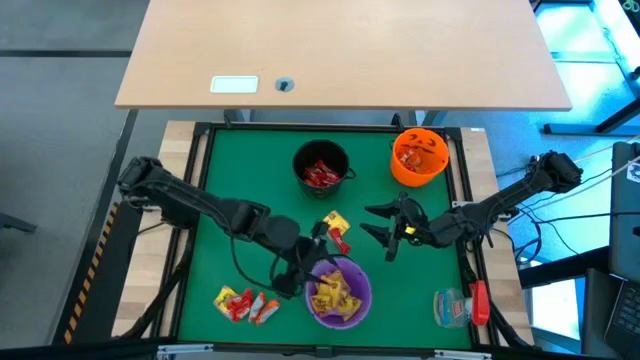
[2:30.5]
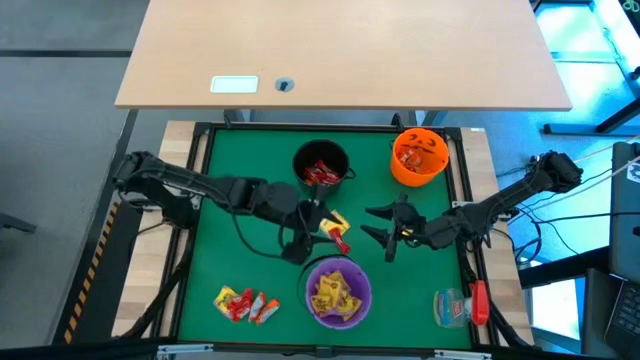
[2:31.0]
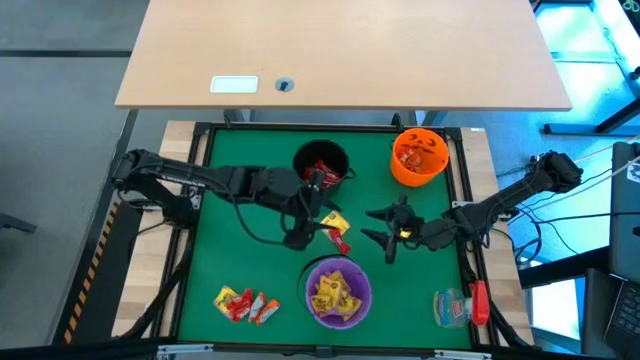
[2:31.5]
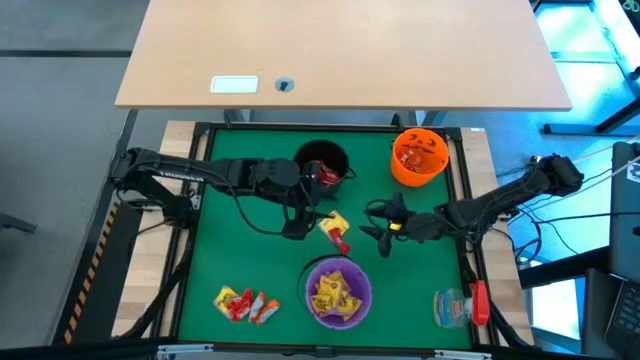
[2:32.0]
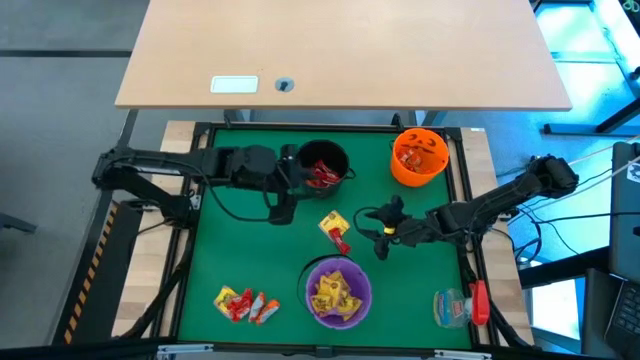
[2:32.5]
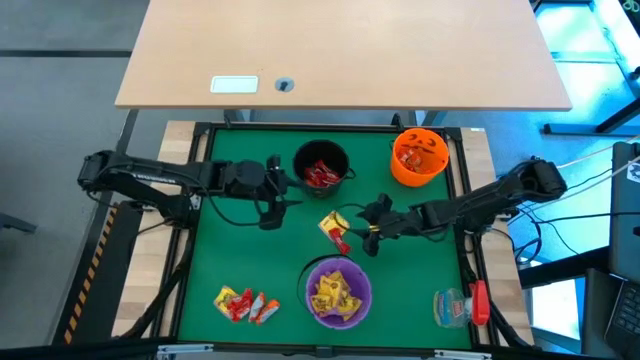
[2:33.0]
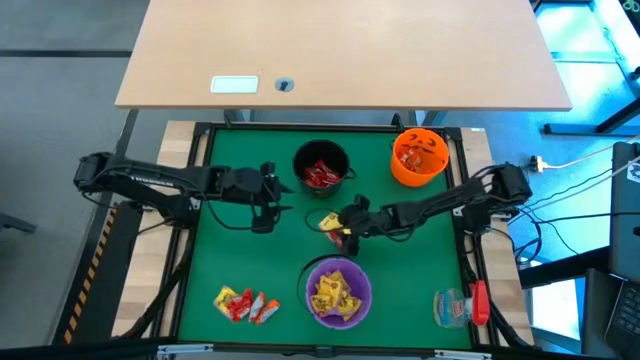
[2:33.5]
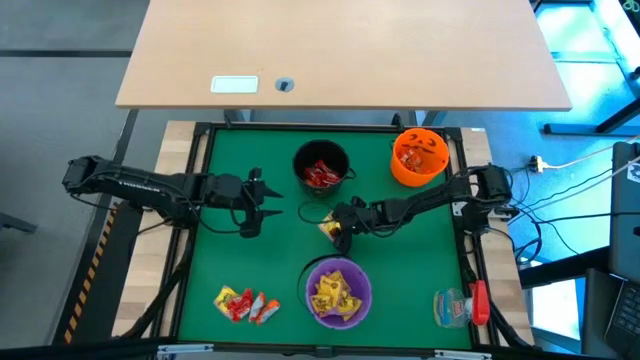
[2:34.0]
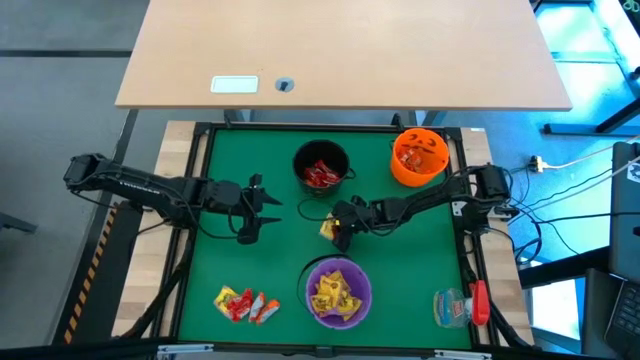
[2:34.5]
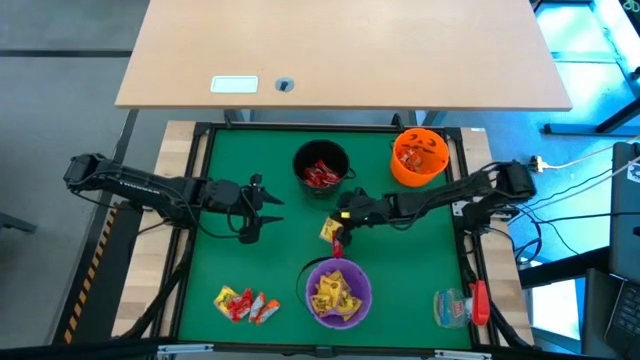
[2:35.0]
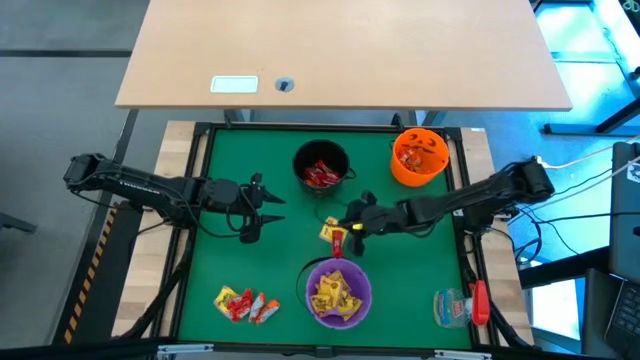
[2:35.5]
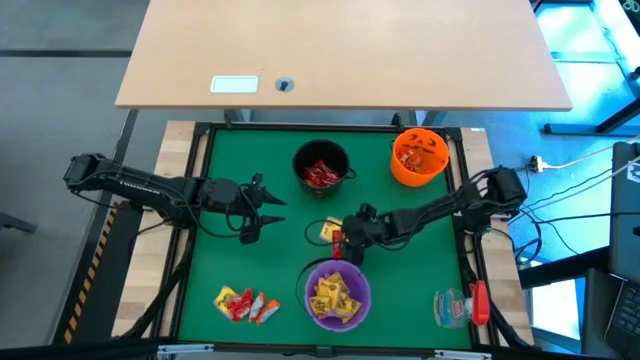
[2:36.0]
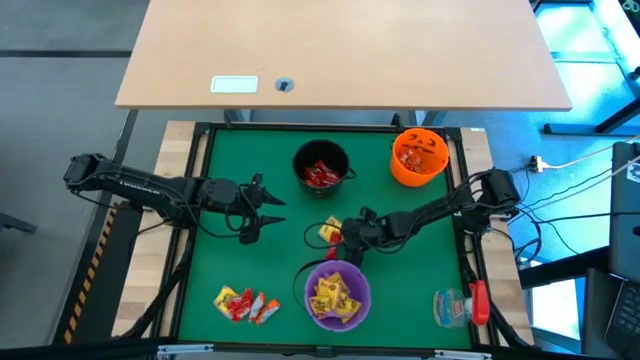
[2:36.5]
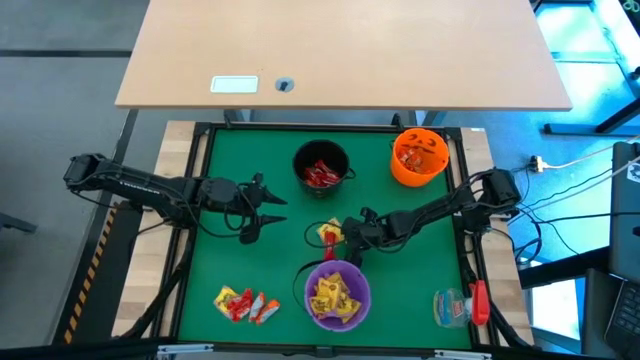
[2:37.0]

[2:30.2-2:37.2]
Task: Sort candy
Put the yellow candy into the purple bucket

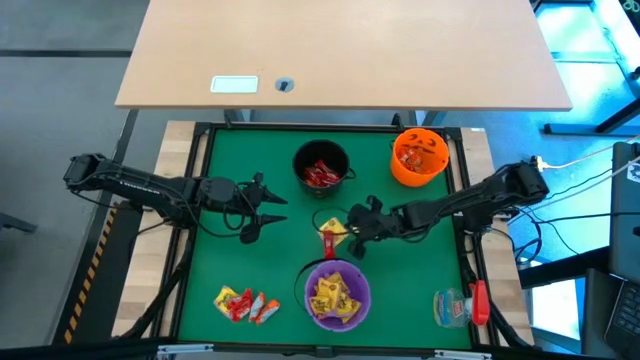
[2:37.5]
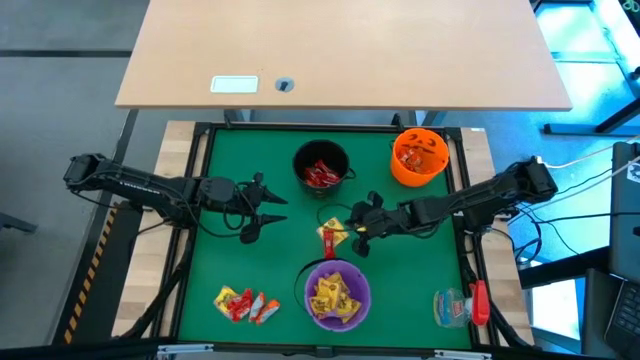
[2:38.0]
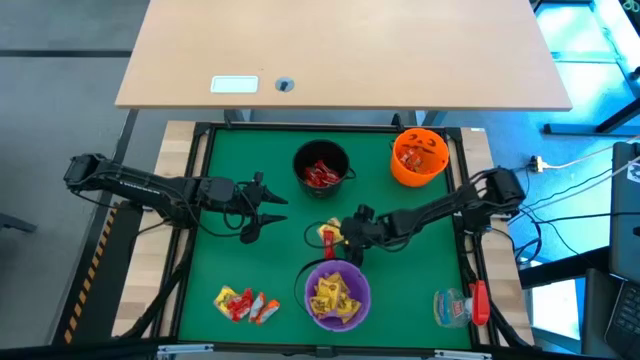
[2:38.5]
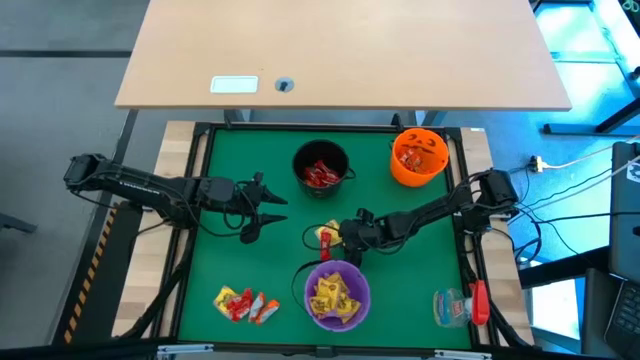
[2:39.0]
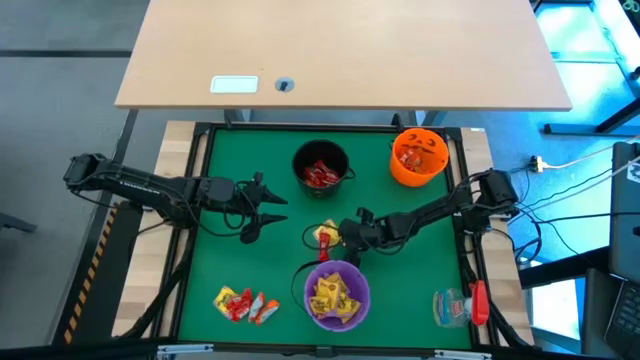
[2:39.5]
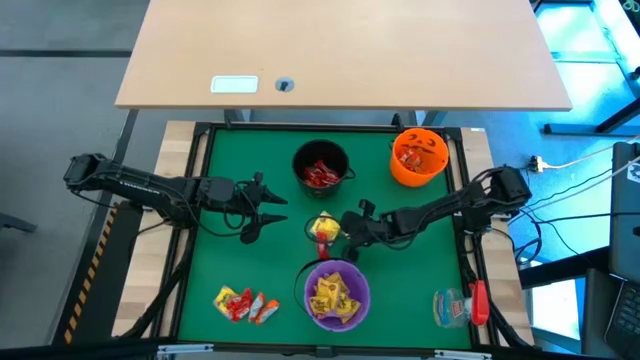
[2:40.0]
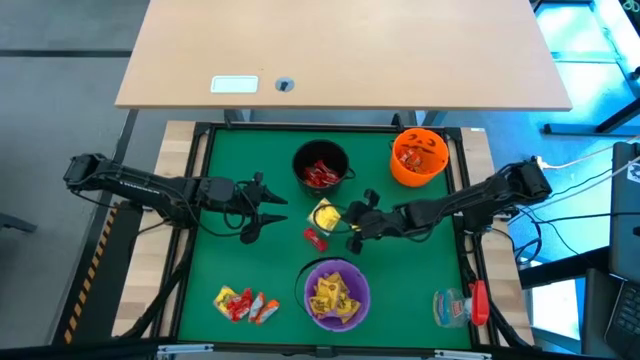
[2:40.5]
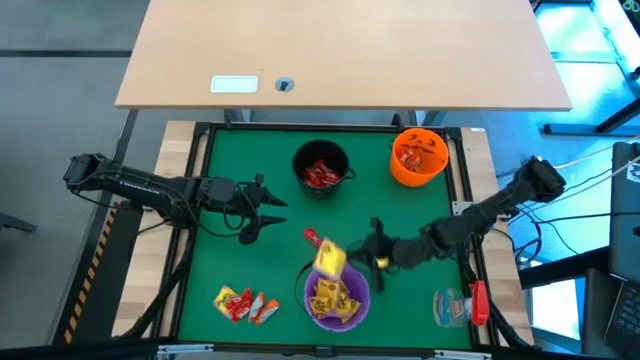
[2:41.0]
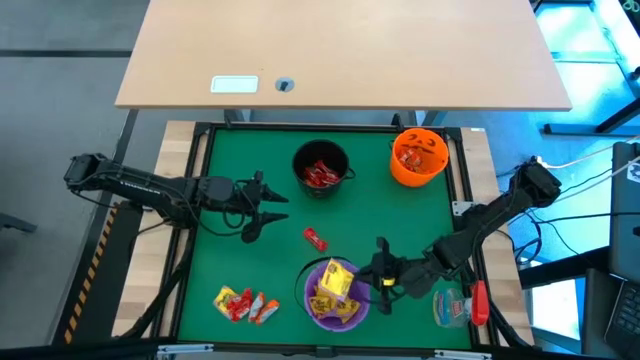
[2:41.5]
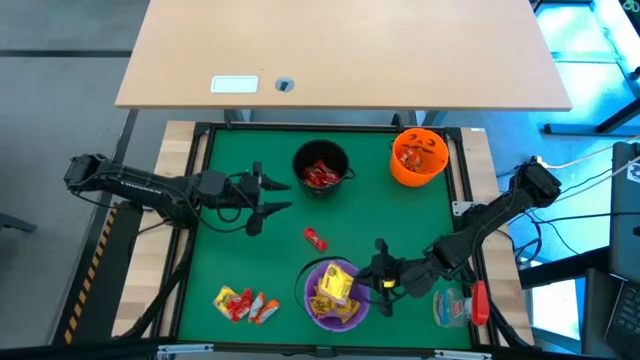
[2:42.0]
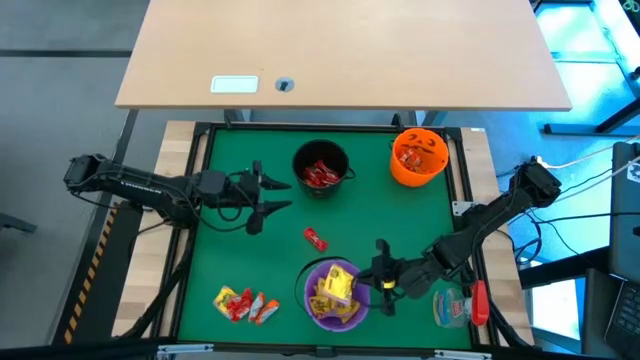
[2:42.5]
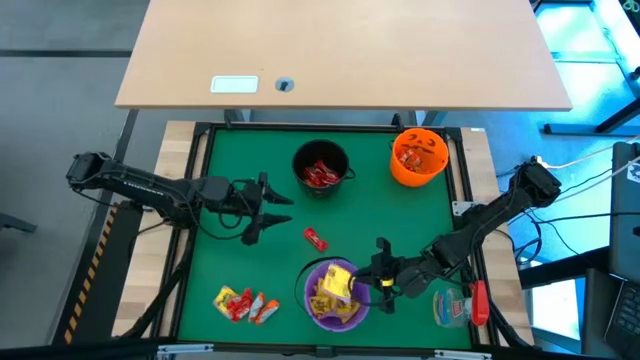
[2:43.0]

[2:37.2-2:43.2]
Put the yellow candy into the purple bucket

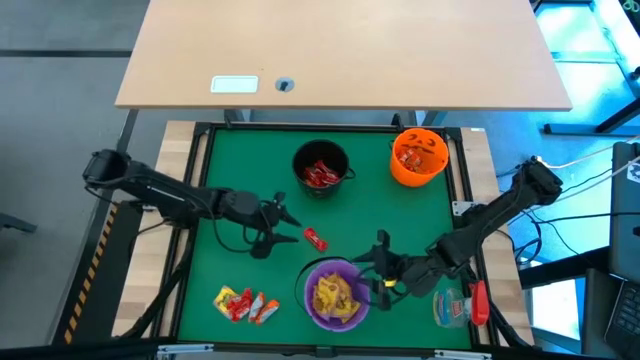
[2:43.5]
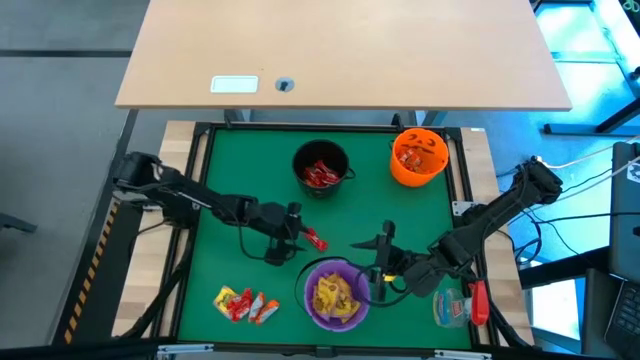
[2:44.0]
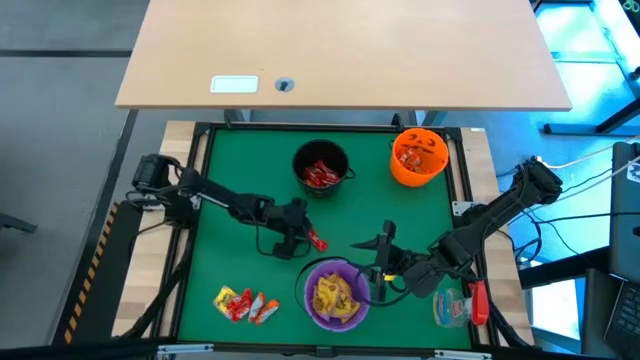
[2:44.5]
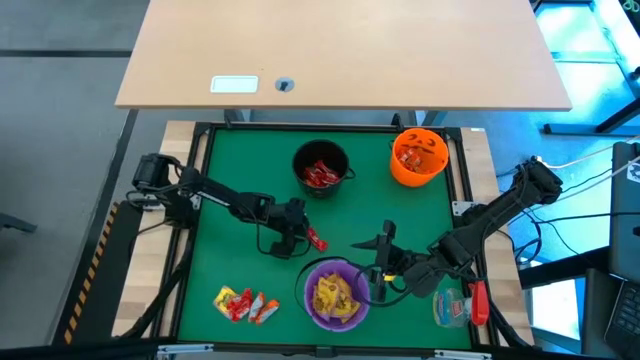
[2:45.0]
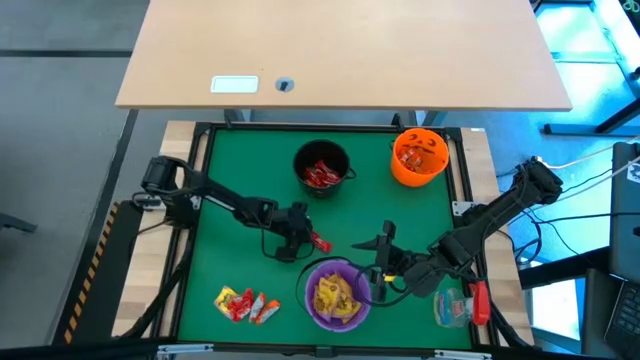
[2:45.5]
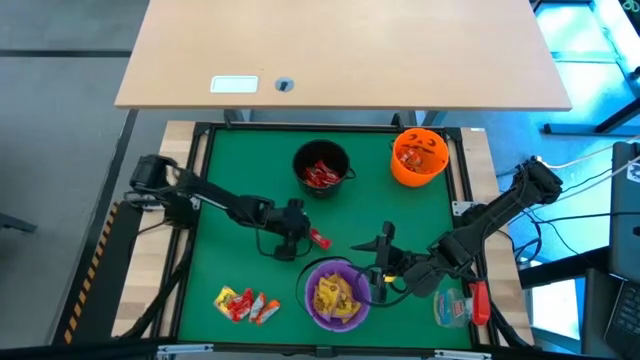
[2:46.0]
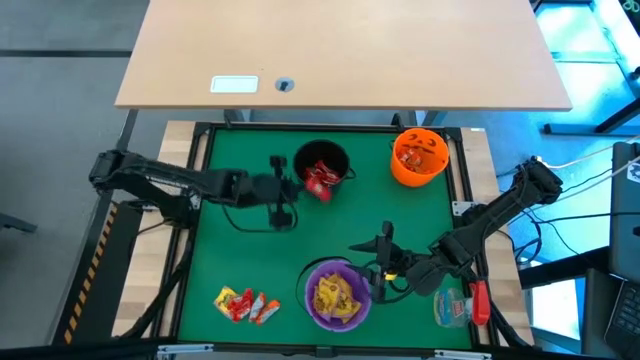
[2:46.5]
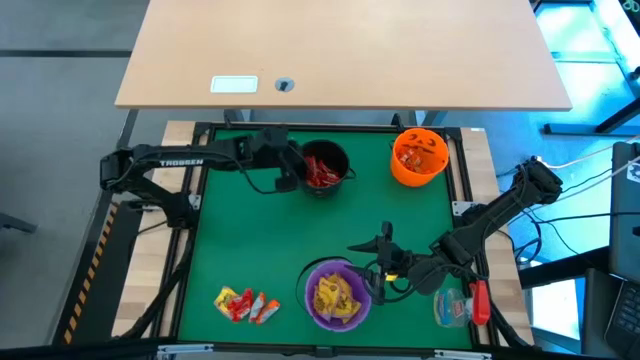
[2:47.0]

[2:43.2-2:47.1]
Put the red candy into the black bucket

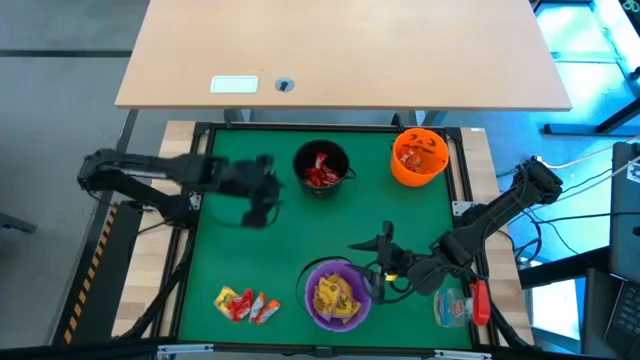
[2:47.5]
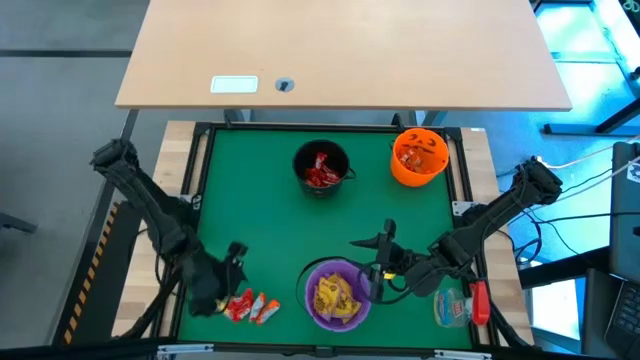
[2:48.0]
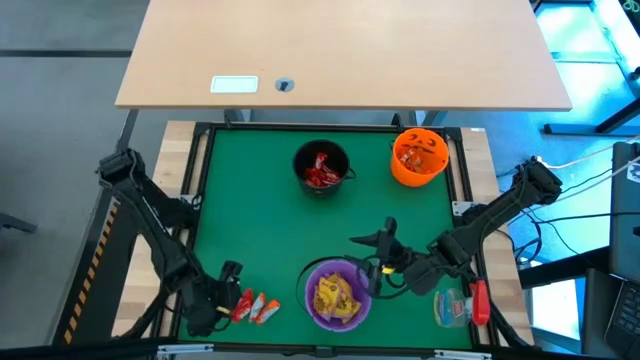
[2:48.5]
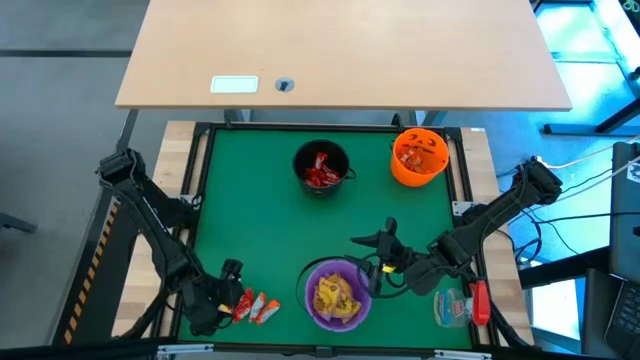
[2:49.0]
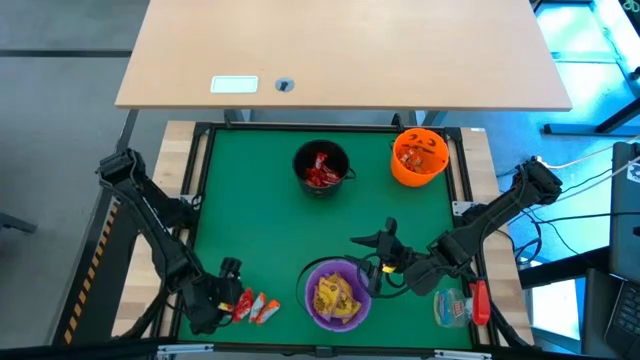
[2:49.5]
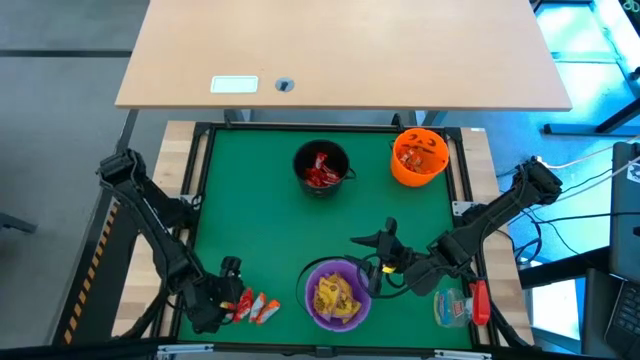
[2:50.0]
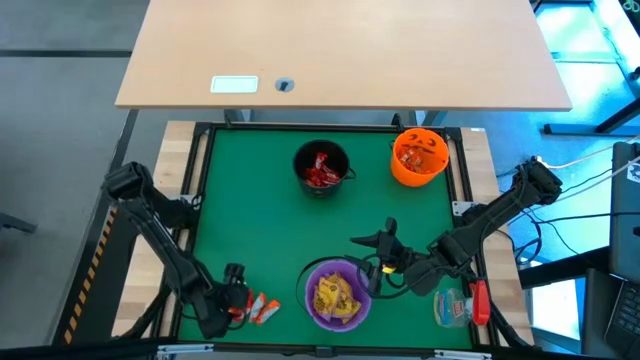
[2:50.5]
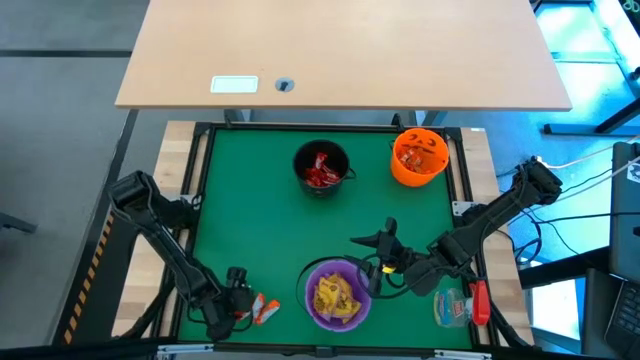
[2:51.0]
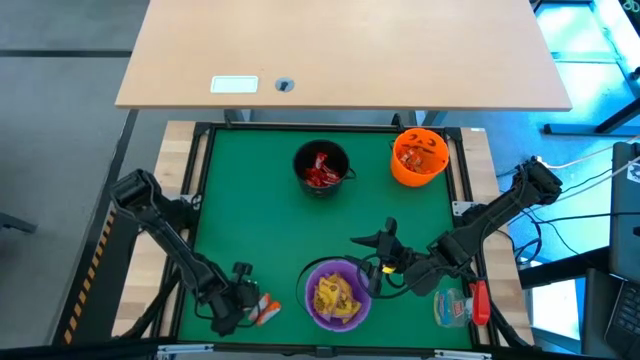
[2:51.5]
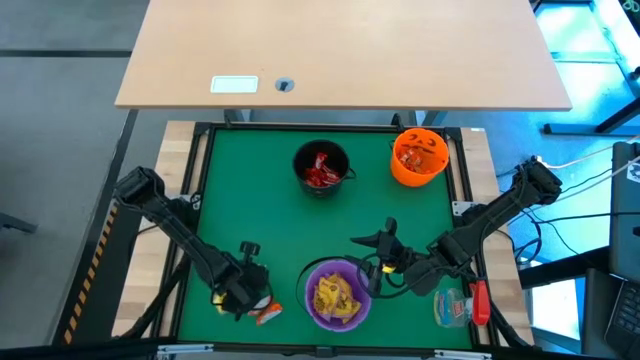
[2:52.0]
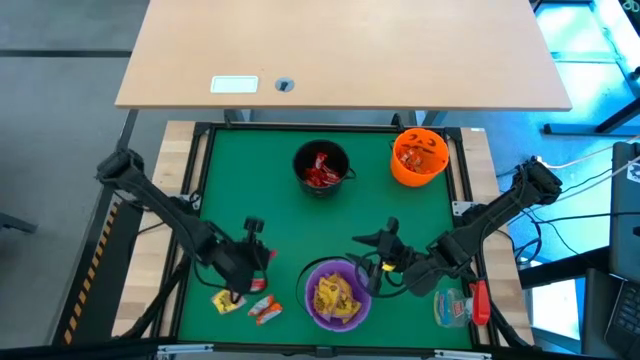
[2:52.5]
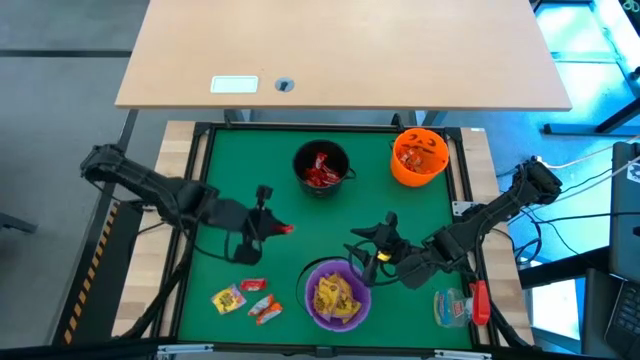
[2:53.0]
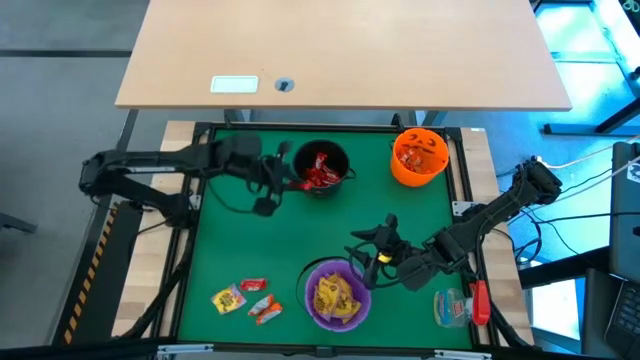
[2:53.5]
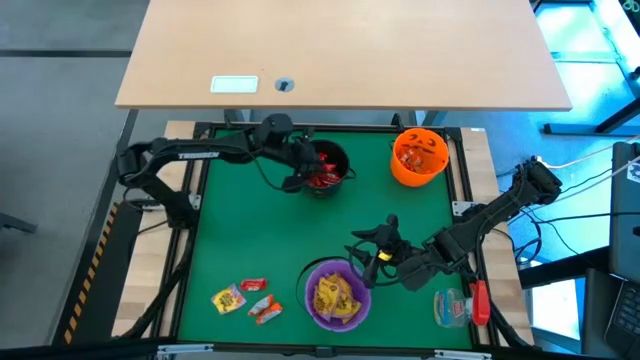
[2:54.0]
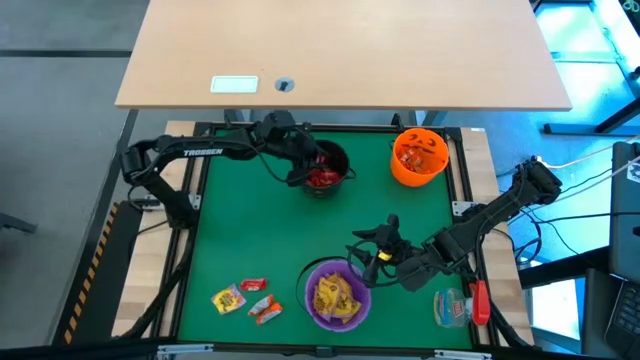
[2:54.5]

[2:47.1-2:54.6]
Put the red candy into the black bucket
